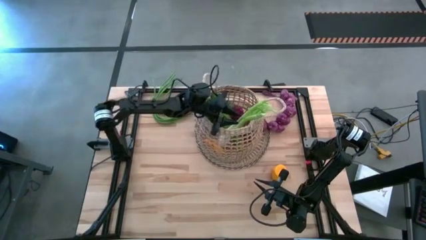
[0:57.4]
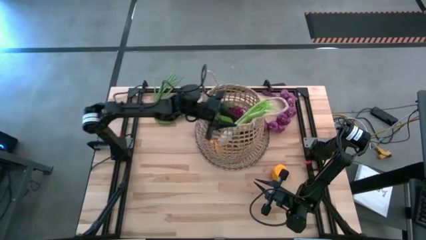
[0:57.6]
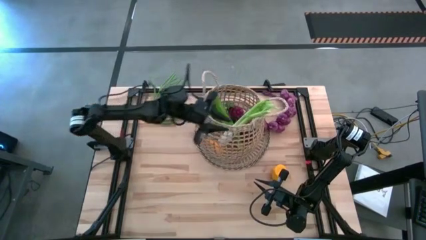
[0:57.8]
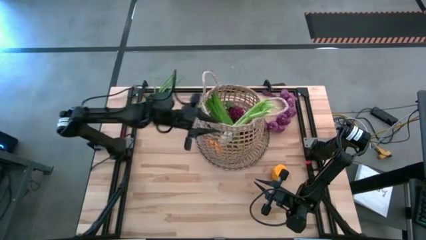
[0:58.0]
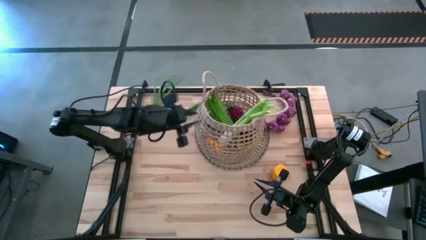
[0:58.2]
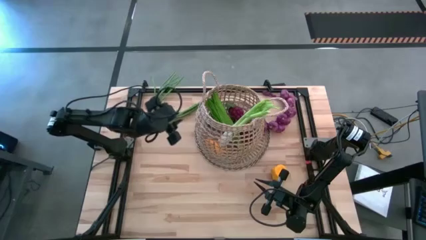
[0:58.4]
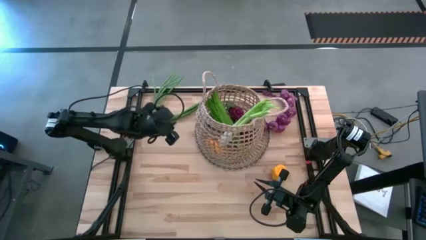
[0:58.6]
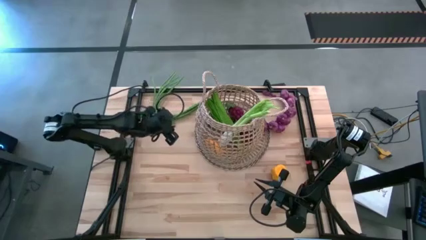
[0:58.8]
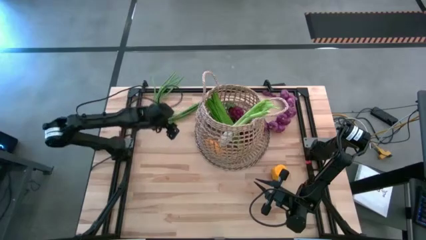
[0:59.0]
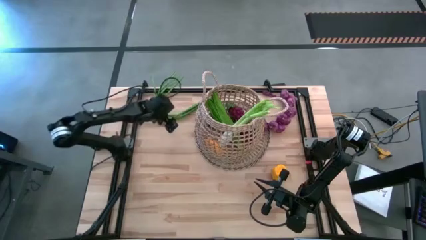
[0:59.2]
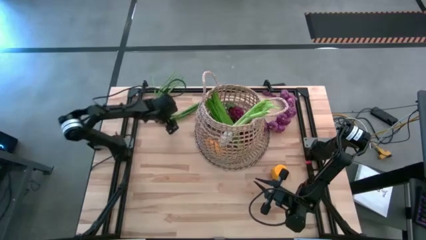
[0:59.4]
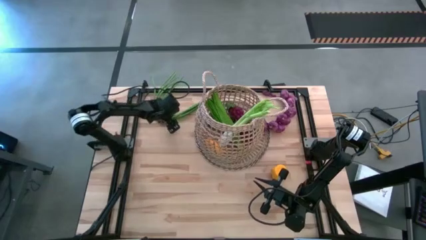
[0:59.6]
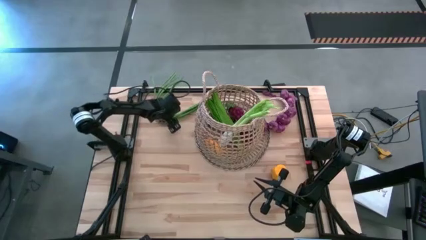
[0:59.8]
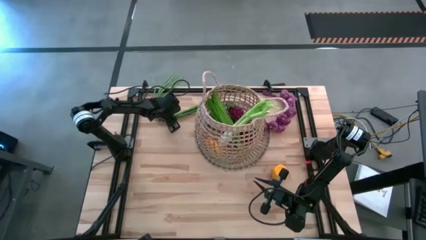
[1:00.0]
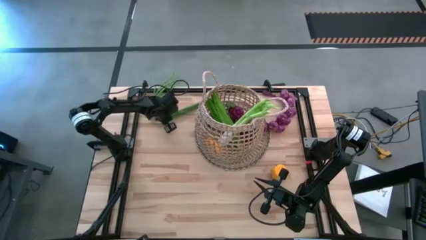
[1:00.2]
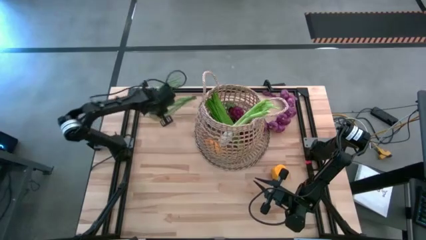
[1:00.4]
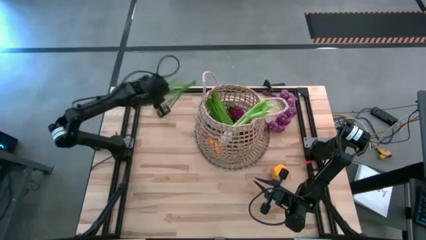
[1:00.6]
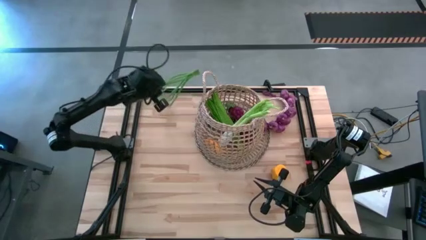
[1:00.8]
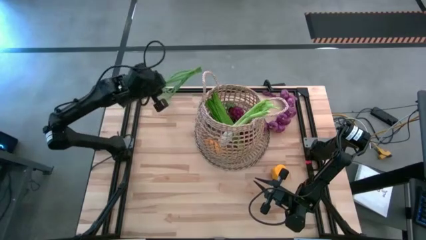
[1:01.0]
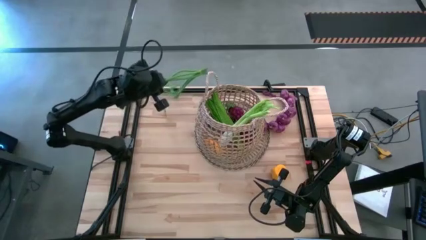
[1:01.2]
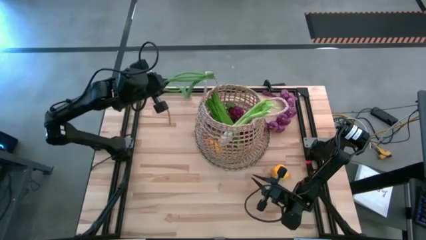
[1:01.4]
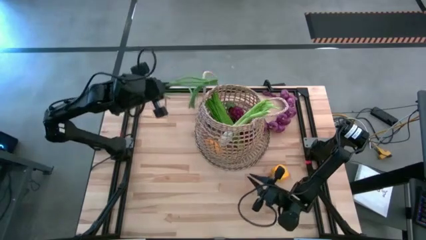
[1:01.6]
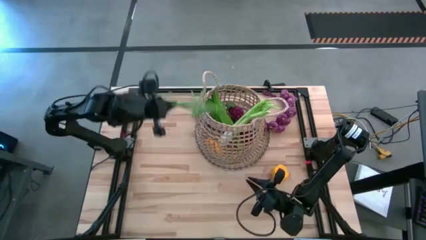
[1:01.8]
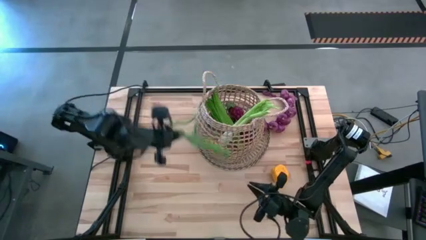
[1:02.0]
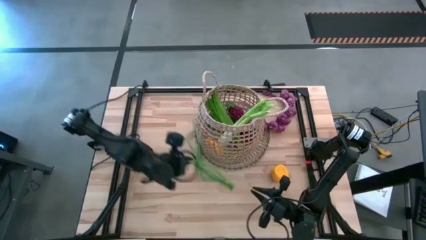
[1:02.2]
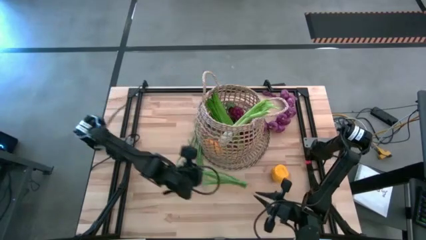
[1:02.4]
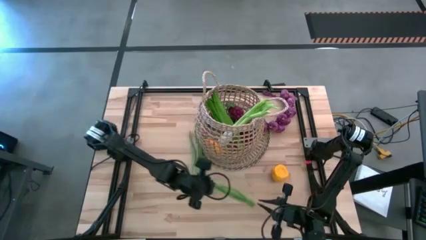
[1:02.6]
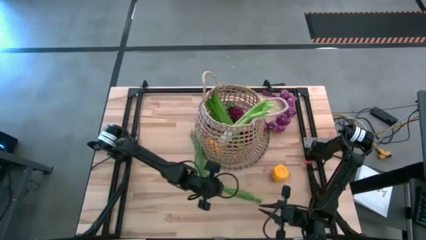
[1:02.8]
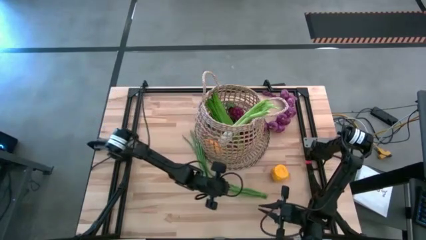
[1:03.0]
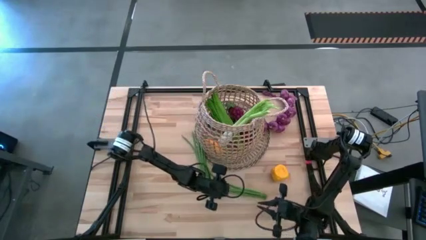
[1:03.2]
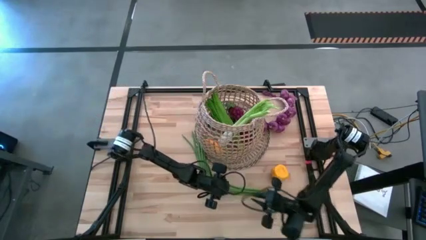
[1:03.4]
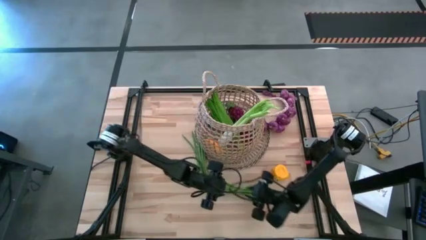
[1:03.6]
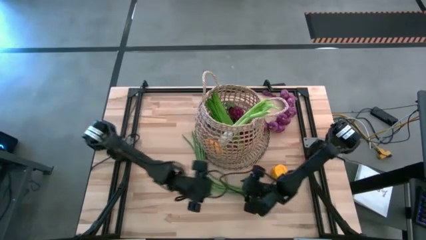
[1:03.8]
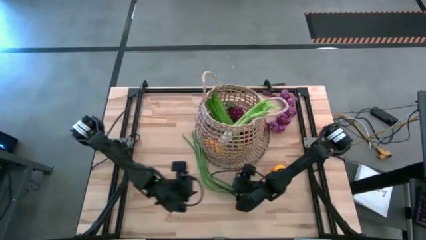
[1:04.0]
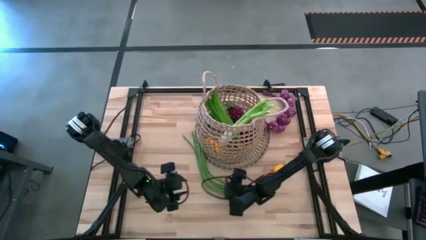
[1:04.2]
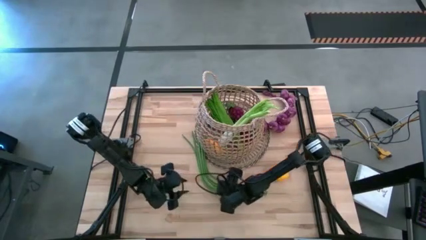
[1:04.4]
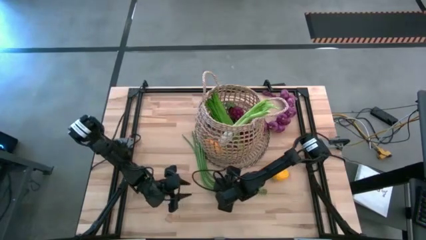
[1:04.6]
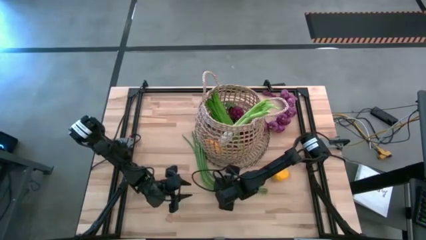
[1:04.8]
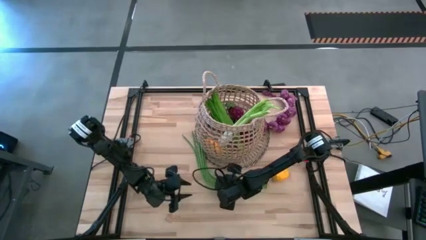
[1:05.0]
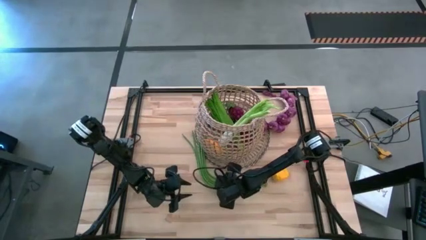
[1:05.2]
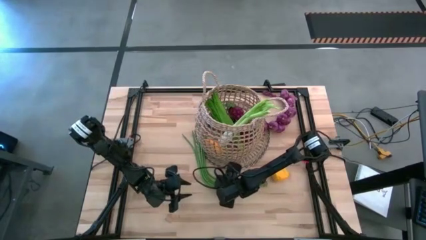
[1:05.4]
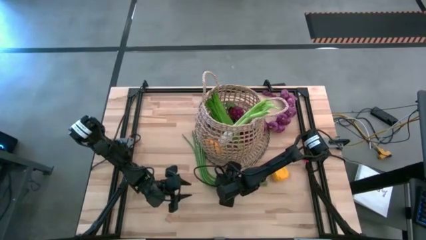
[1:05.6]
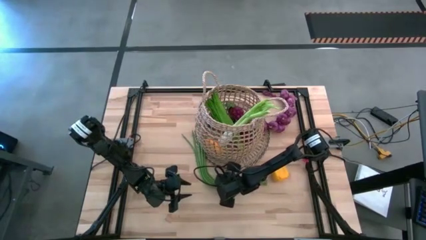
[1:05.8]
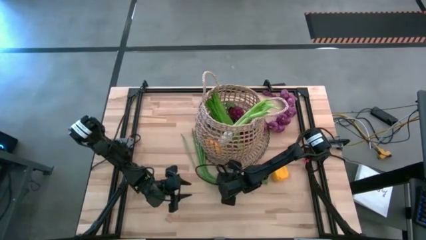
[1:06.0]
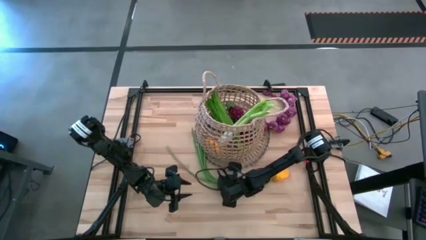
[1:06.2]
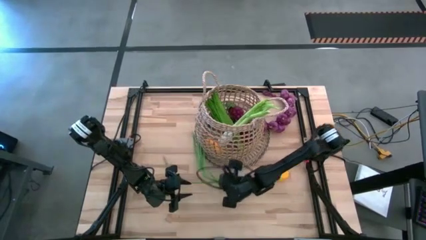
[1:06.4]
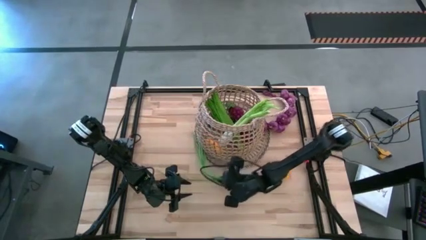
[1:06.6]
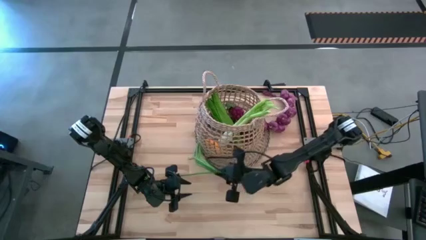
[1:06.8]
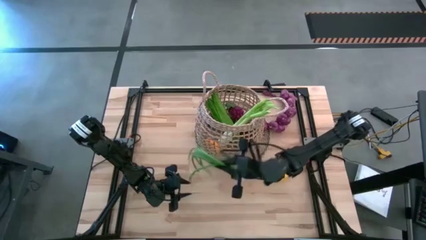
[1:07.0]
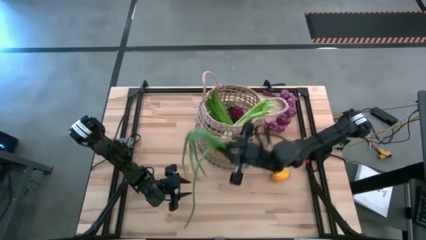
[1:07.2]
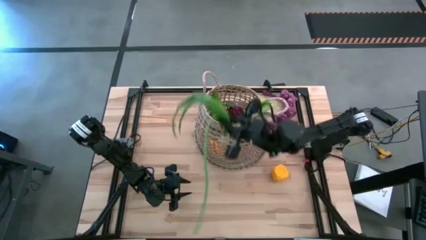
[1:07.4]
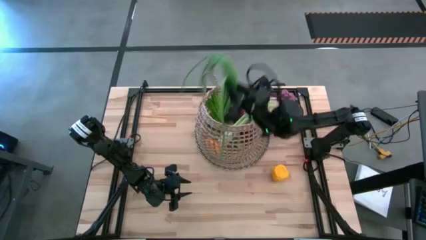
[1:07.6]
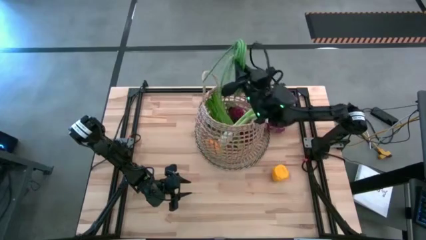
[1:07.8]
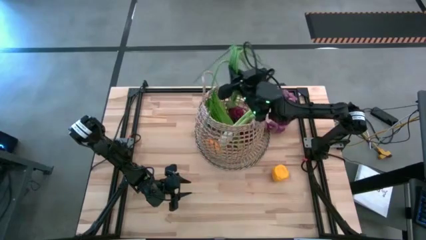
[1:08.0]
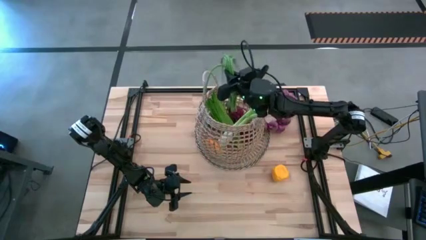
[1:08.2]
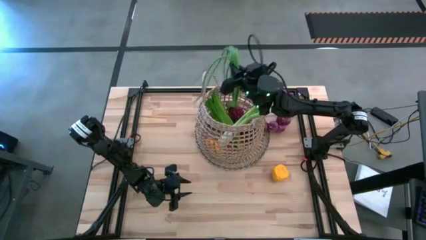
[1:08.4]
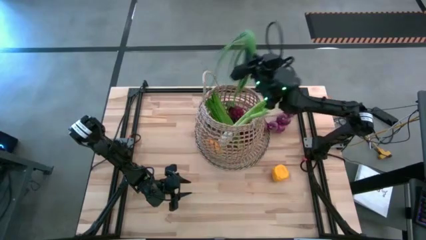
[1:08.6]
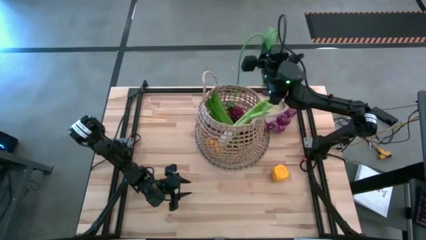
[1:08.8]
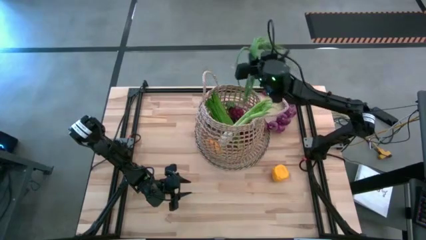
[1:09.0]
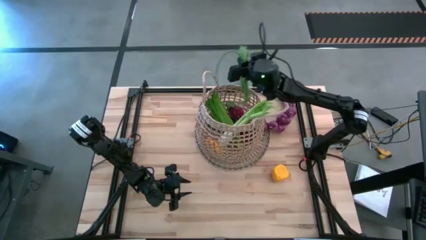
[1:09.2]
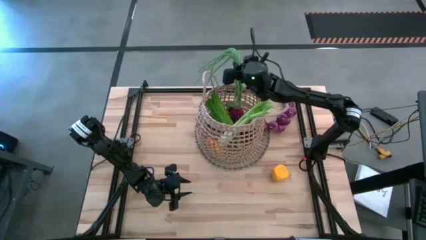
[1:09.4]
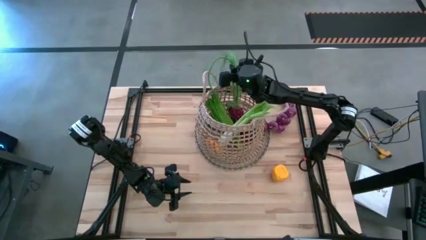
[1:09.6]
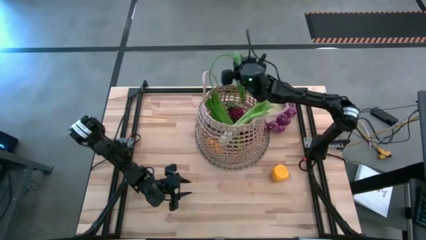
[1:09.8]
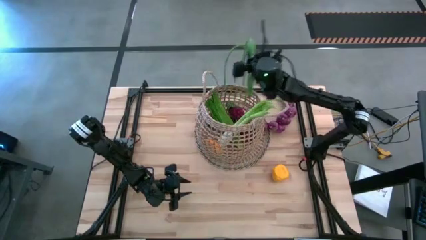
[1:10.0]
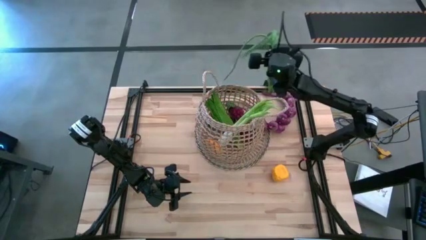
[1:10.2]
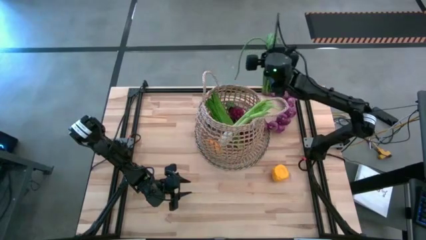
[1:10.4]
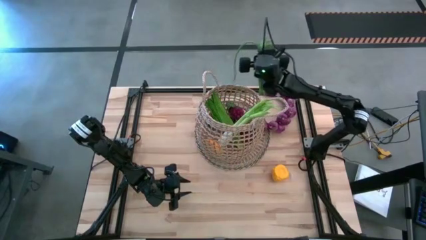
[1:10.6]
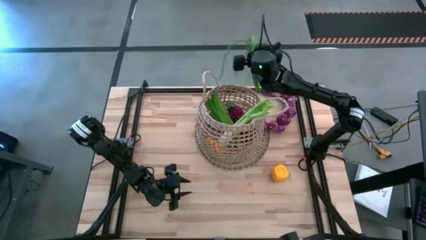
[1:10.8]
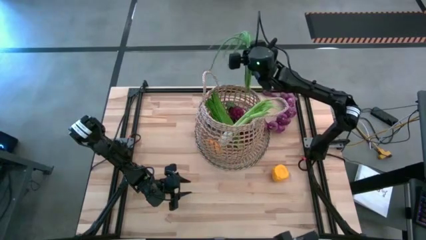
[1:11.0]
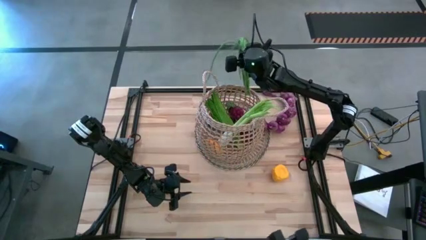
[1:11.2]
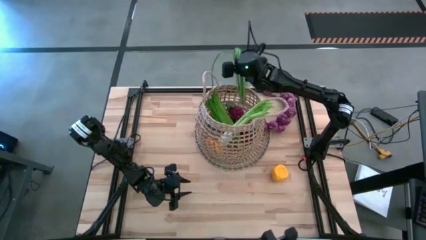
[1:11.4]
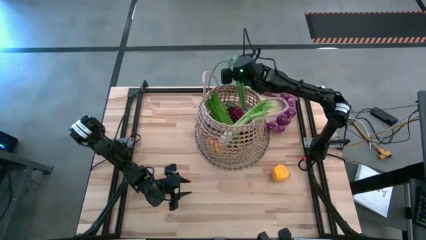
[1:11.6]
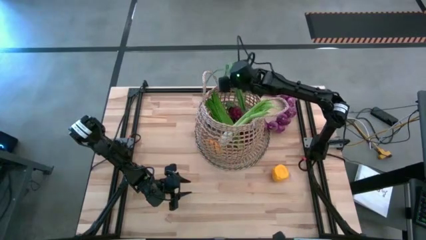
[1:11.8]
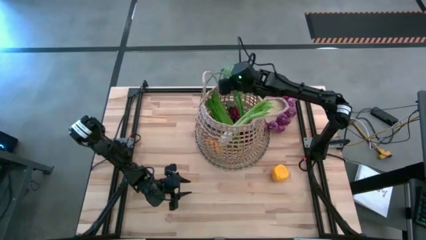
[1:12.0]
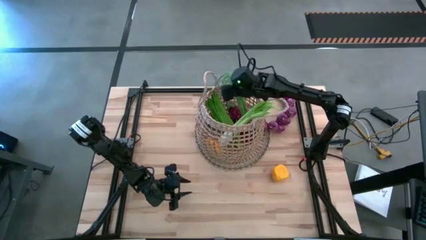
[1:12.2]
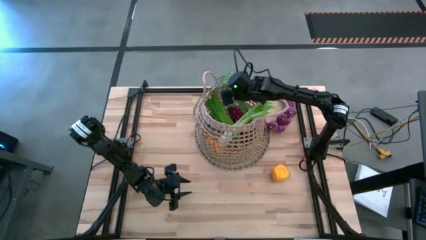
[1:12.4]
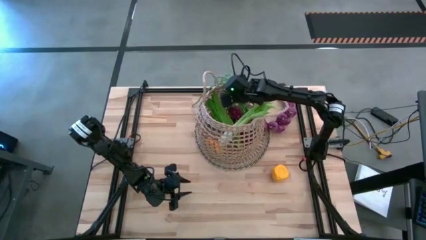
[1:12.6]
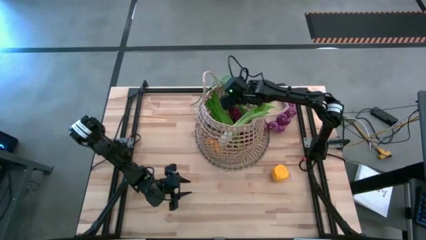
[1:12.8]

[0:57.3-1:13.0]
Task: Build produce basket
Put the scallions into the basket

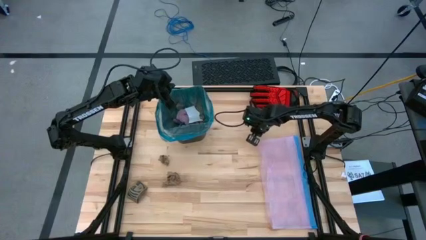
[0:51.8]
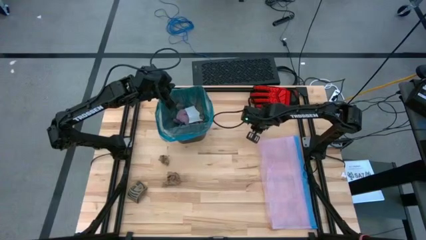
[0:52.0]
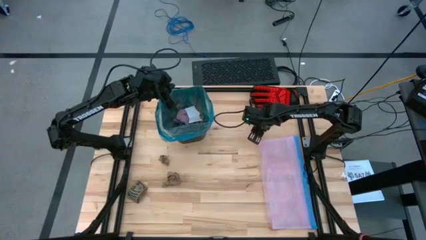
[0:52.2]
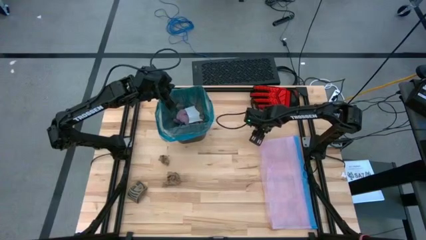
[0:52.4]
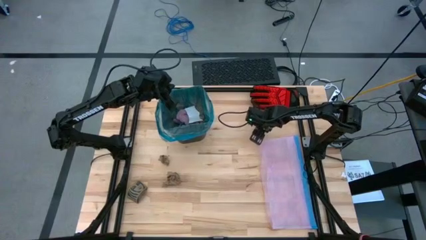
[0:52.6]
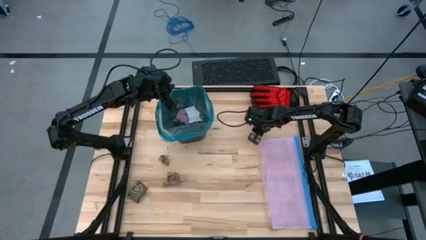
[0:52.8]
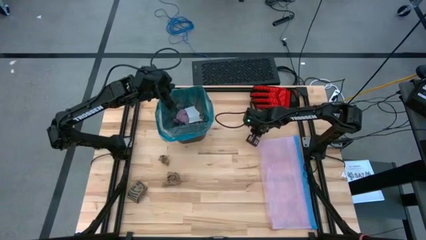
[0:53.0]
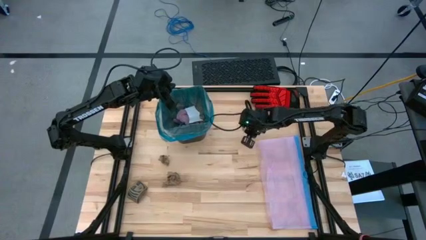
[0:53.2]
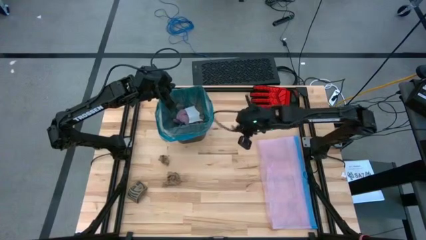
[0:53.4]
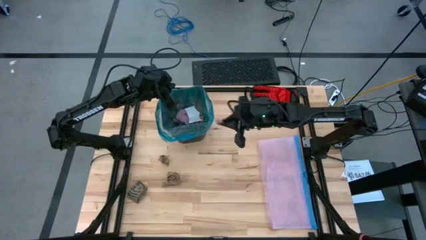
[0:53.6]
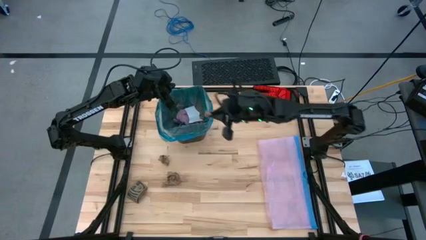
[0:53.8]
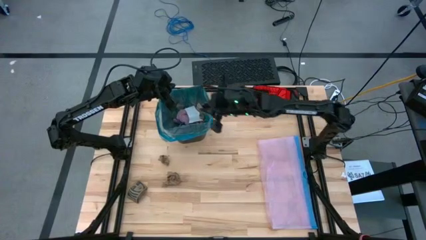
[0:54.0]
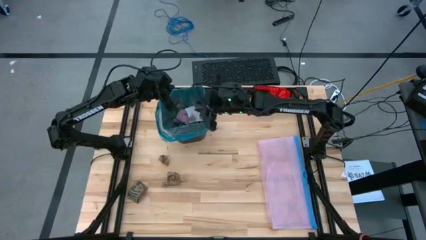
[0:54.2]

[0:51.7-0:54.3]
Task: place trash/remove bag and relplace
Put the brown napkin into the black trash bin
